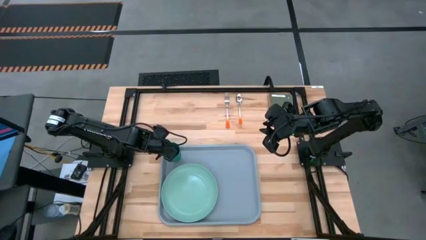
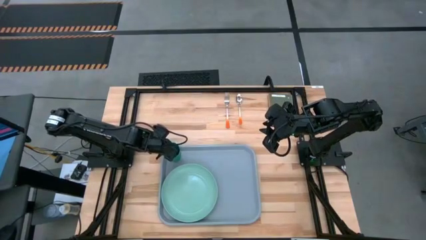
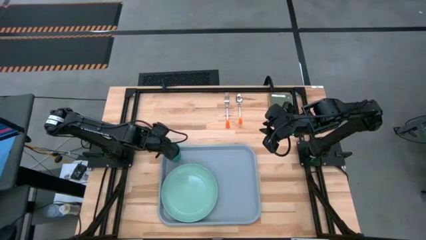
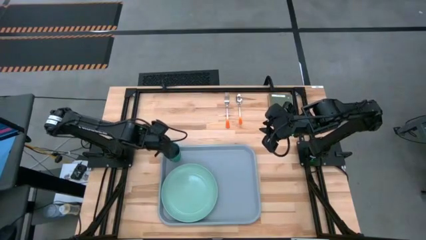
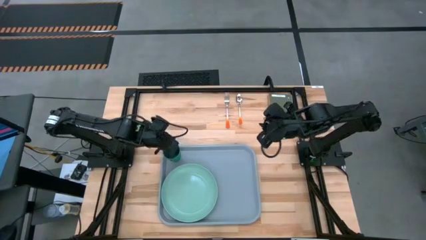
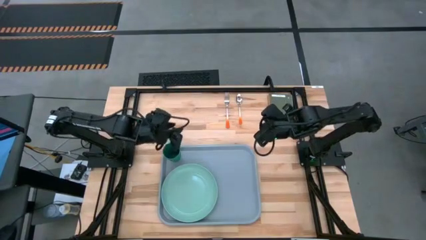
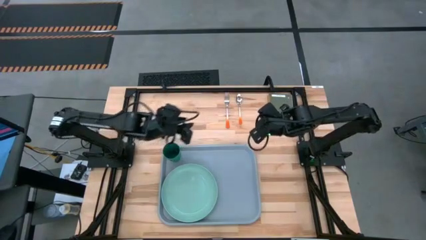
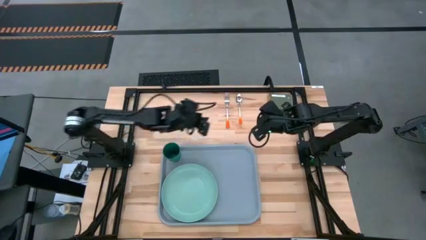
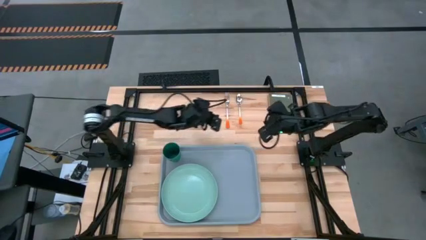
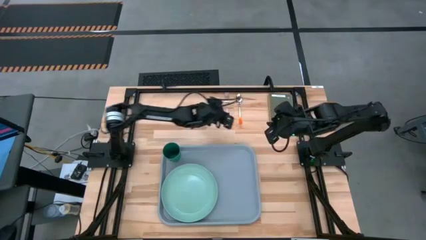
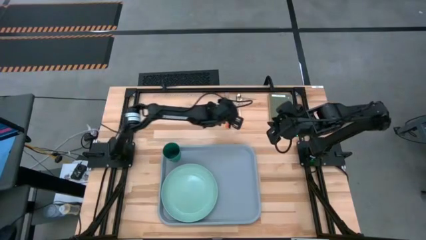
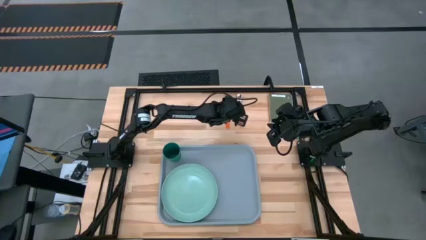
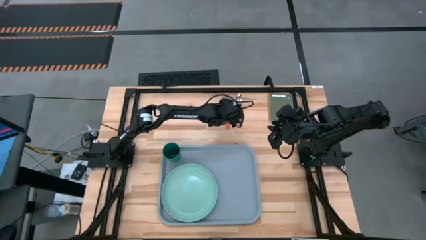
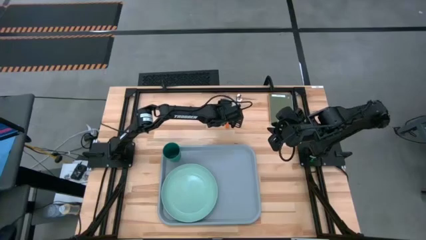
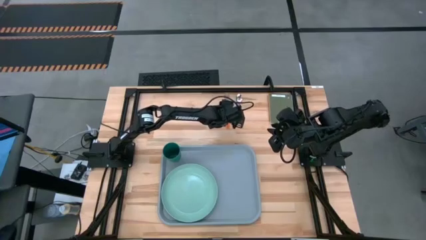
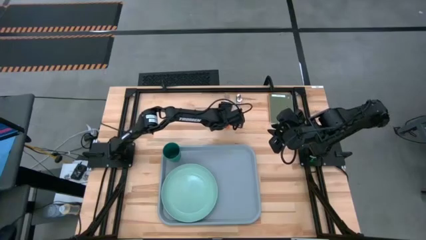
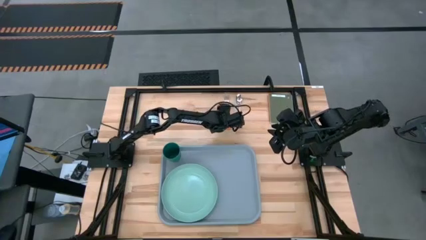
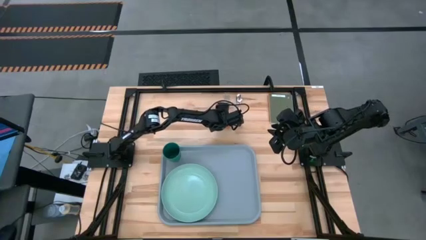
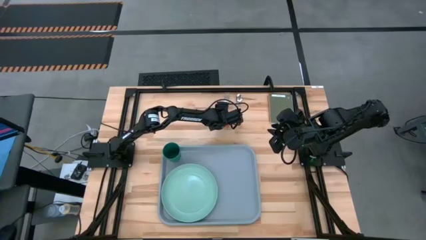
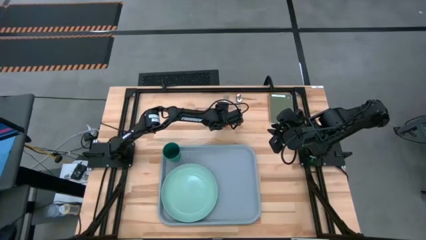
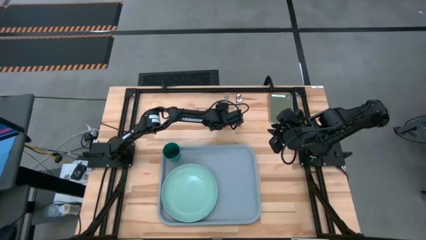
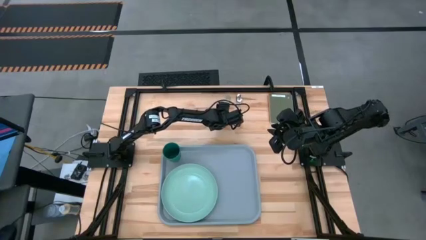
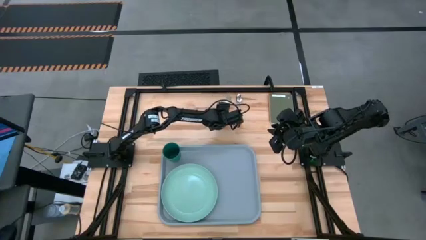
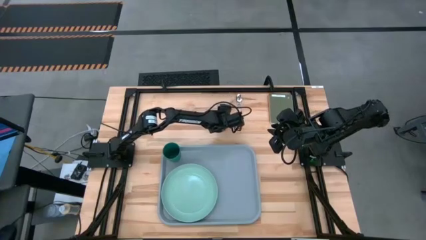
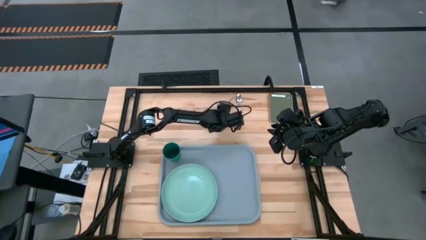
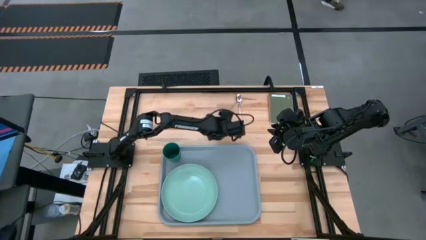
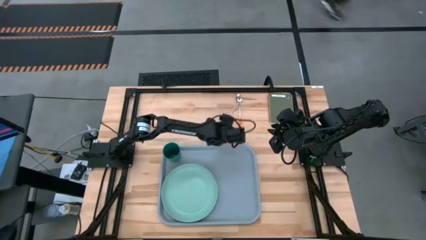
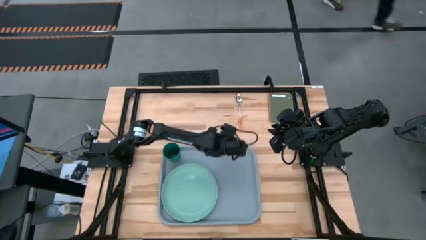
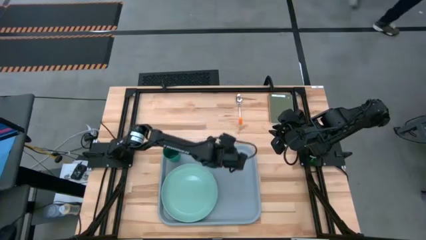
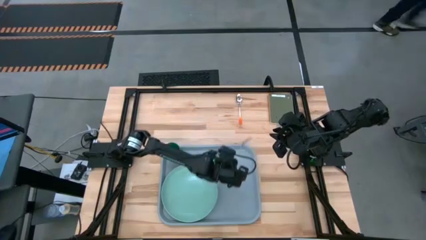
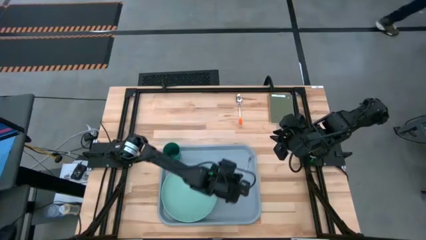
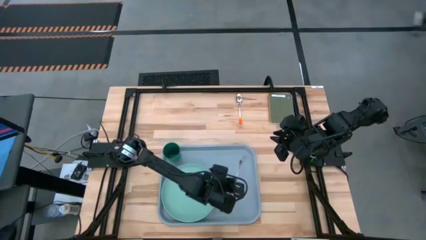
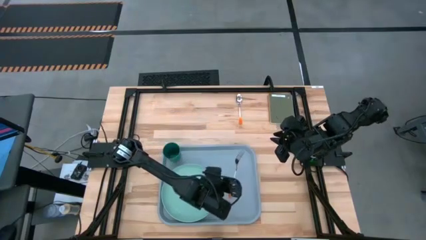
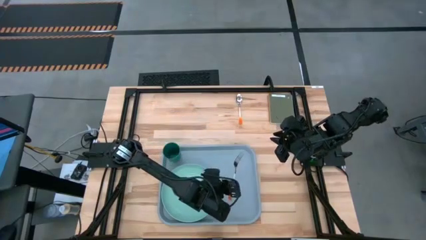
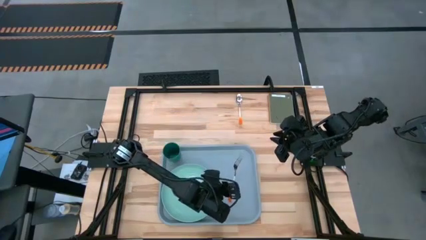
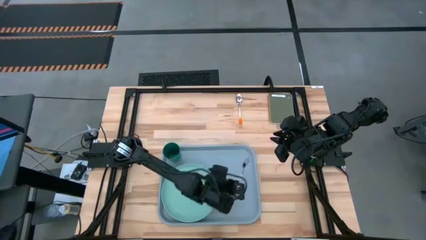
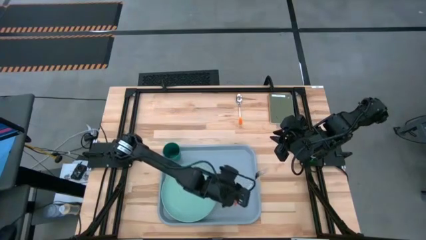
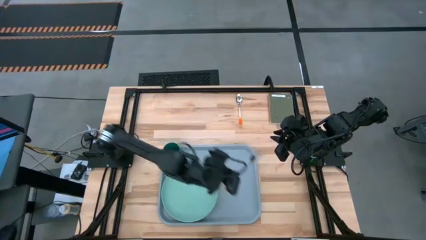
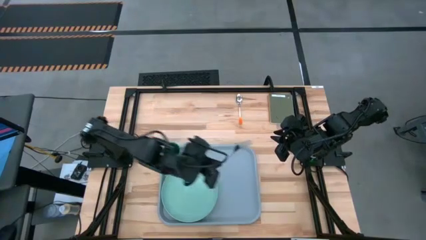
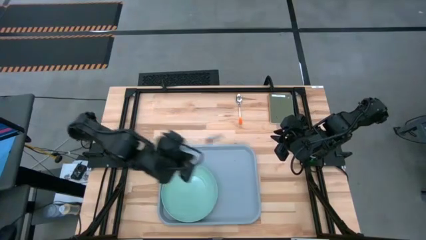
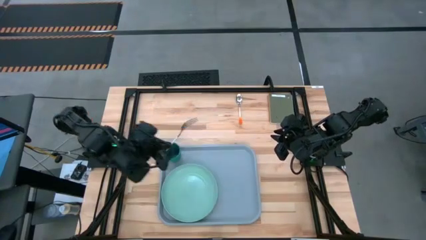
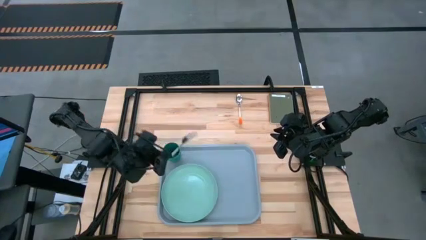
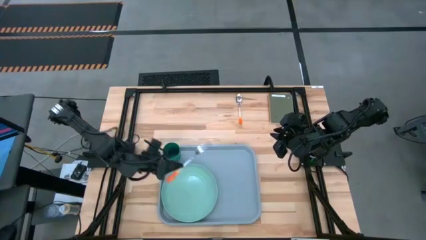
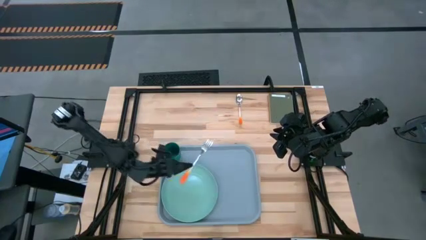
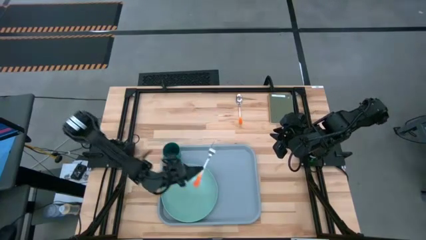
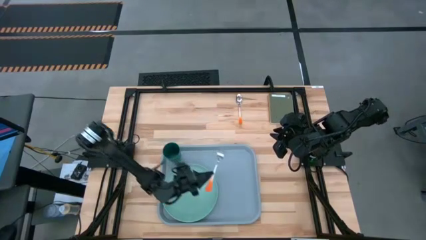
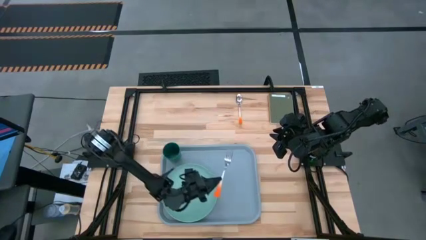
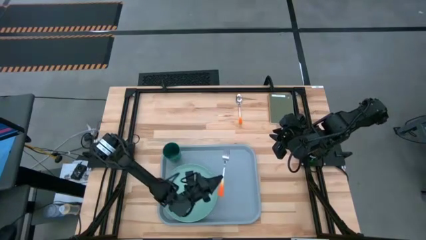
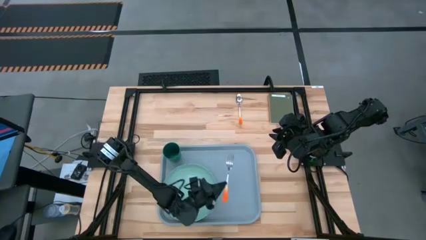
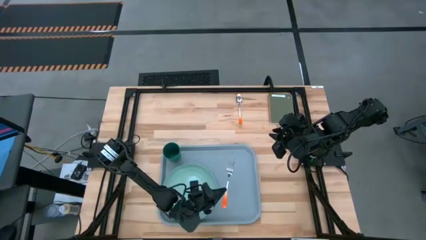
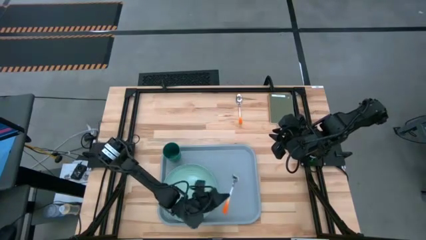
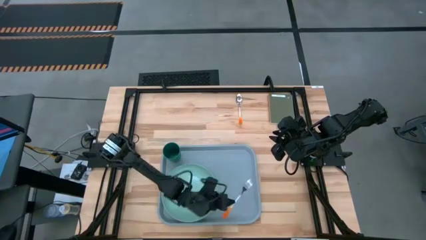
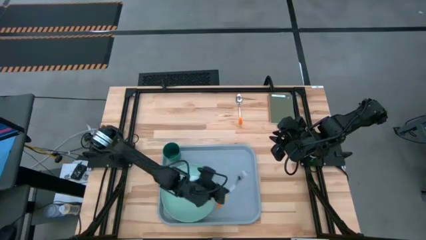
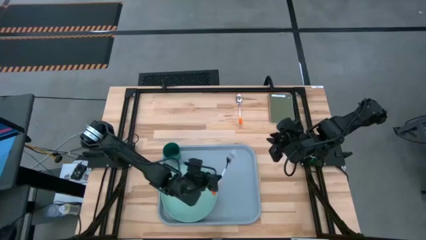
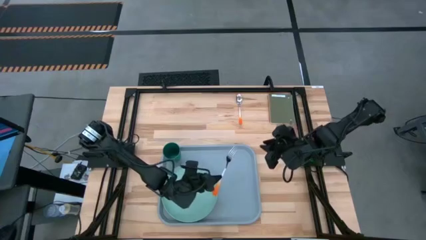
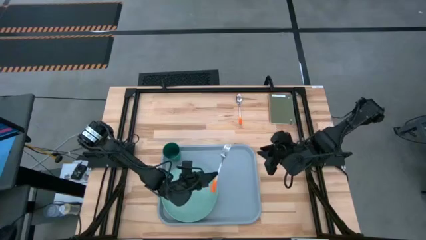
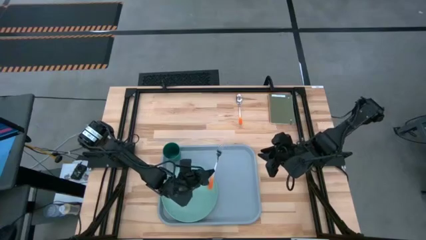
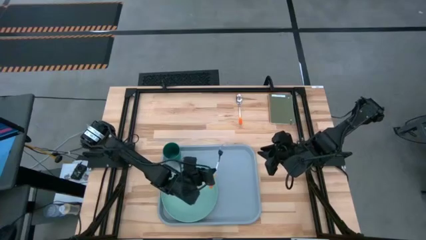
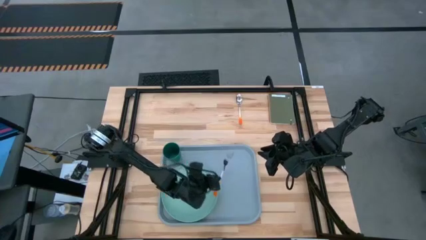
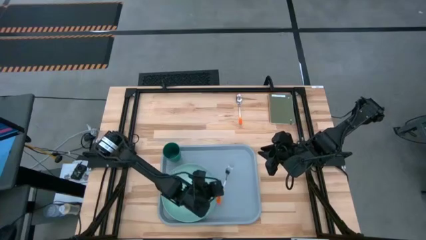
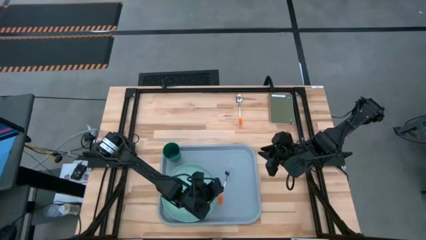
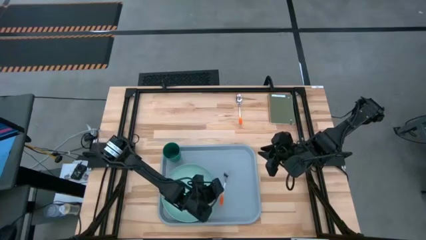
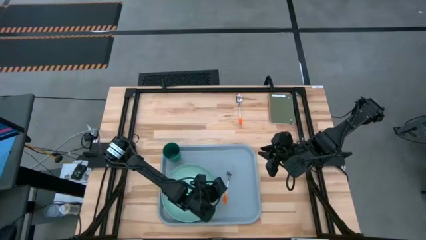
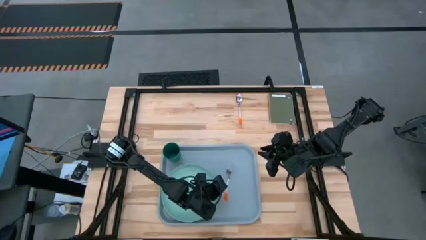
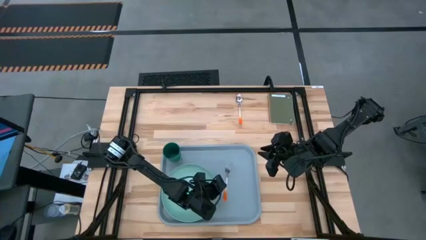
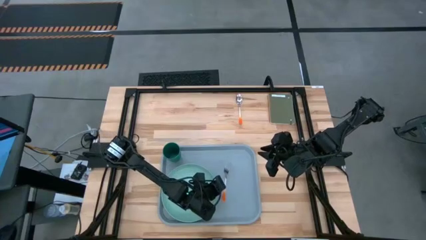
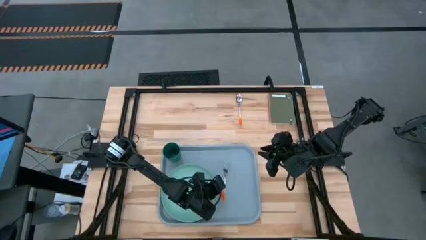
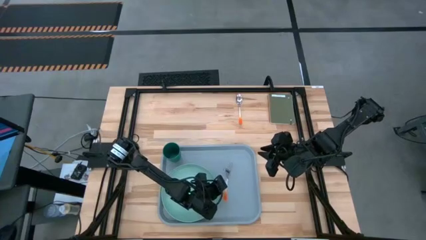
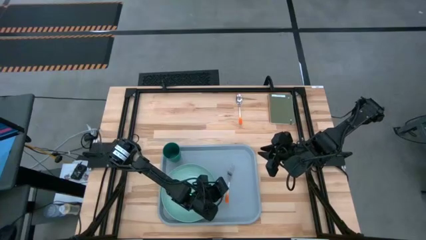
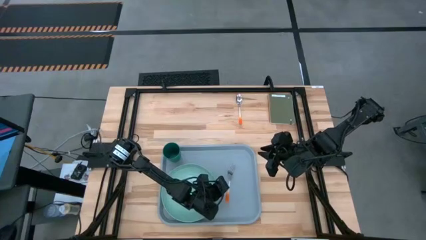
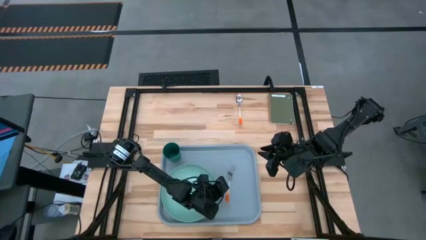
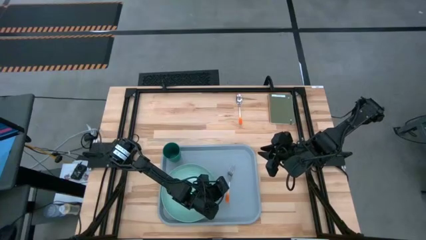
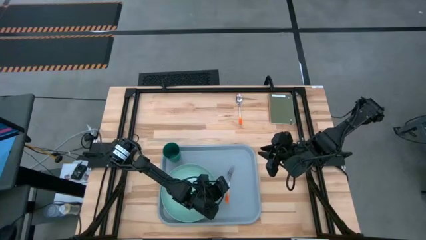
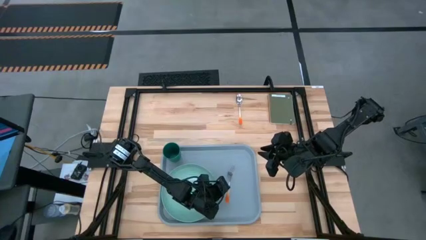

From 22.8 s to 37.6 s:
Task: Pick and place plate/cup/fork/spoon on tray
Put the orange fork to the right side of the blue plate on the blue serving tray
